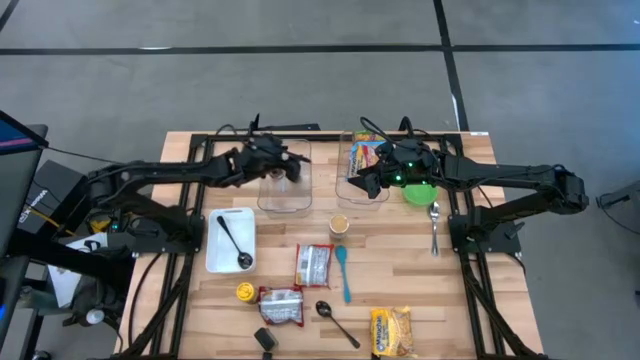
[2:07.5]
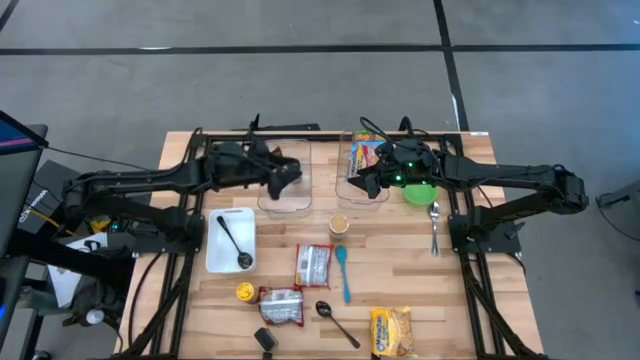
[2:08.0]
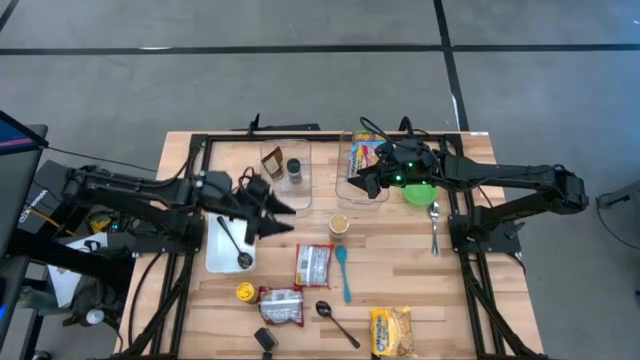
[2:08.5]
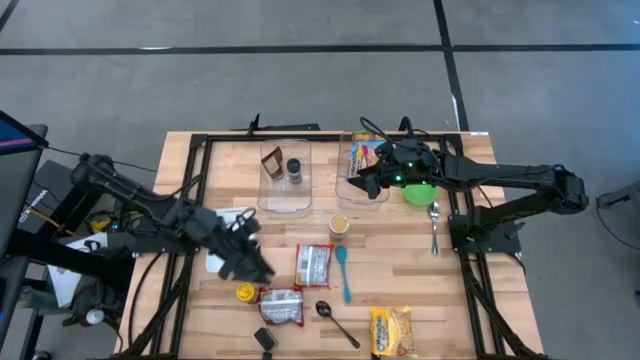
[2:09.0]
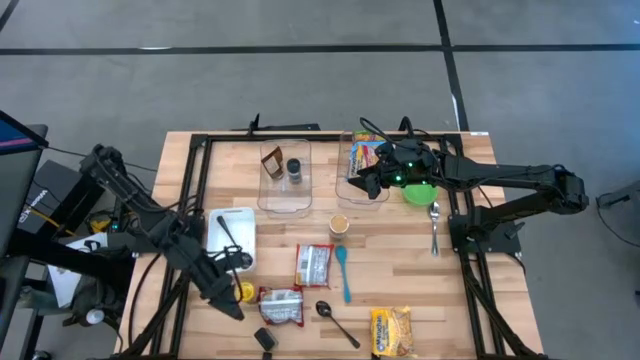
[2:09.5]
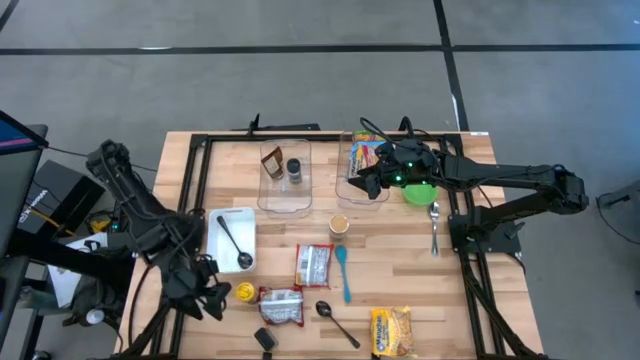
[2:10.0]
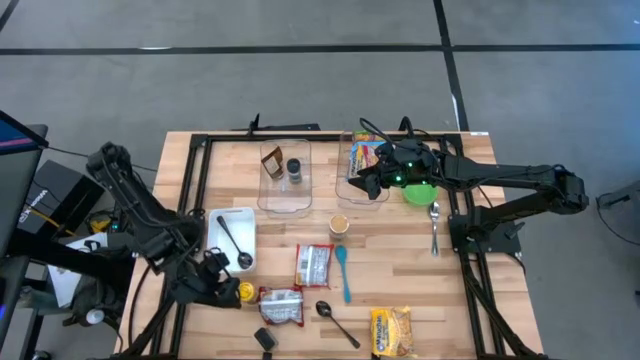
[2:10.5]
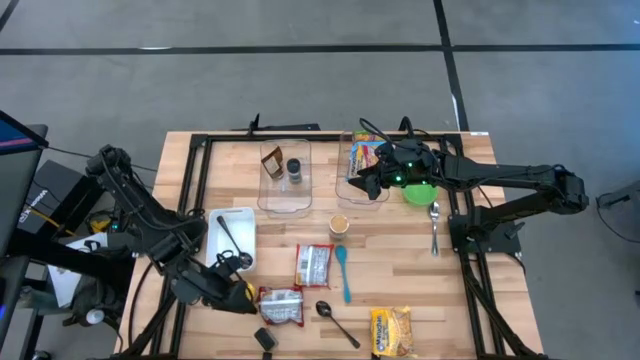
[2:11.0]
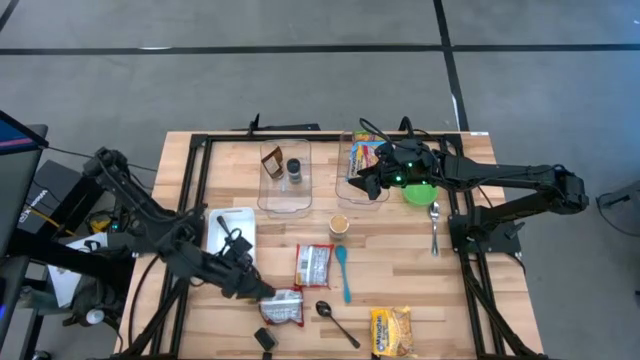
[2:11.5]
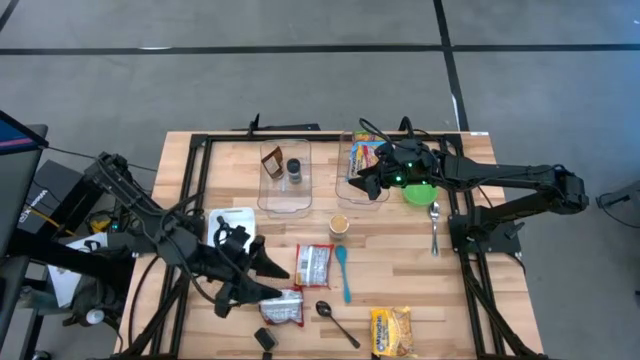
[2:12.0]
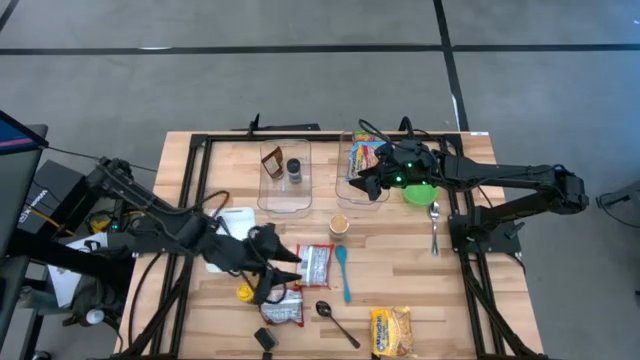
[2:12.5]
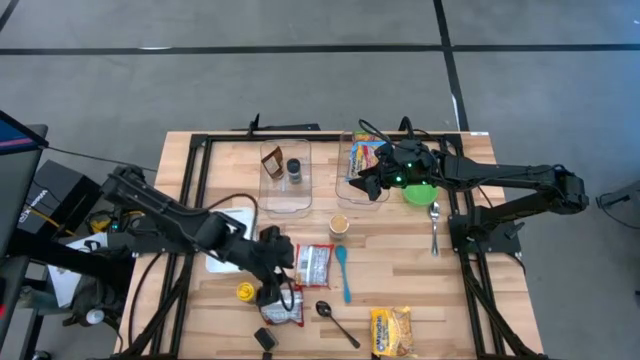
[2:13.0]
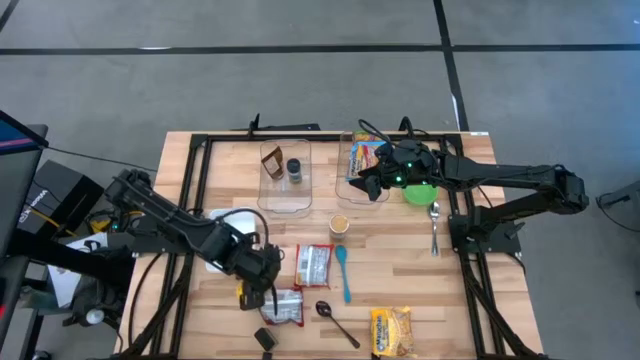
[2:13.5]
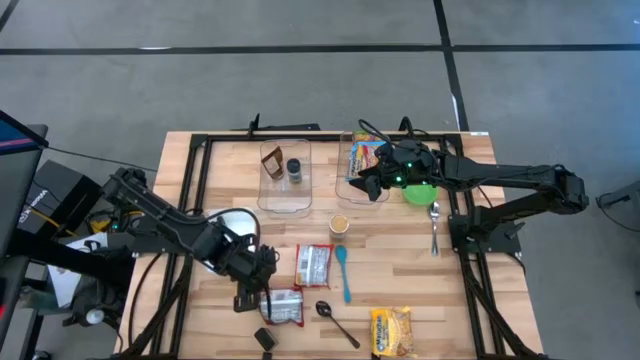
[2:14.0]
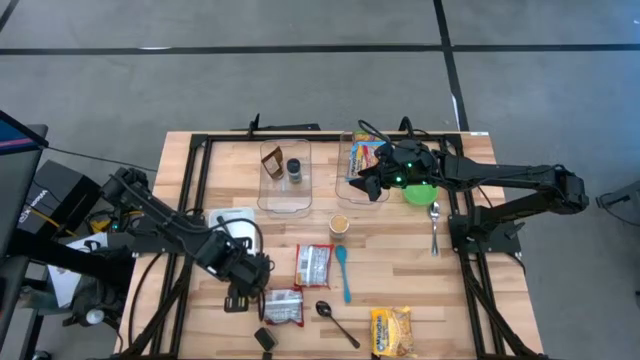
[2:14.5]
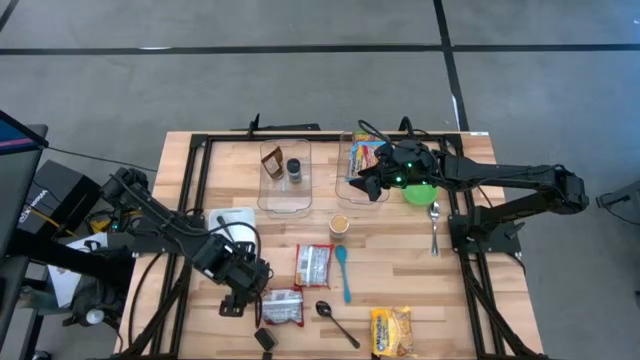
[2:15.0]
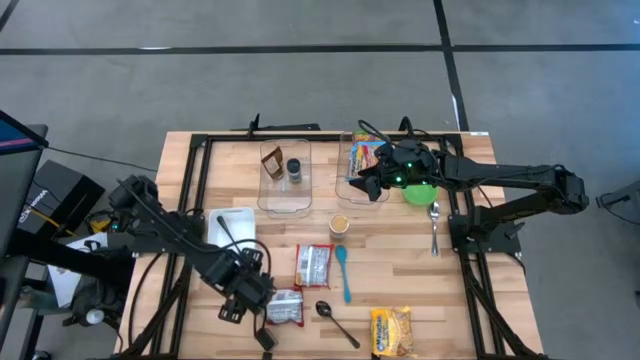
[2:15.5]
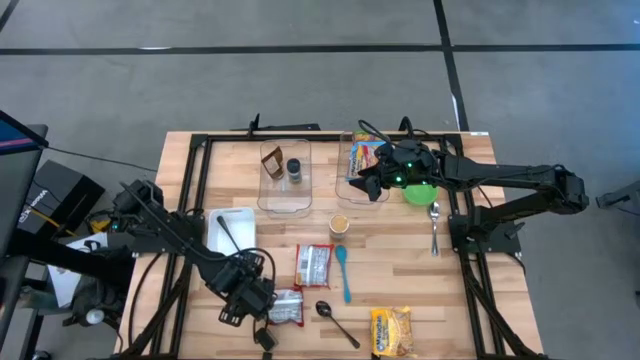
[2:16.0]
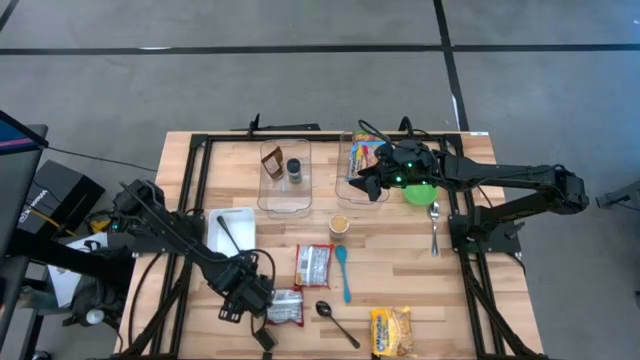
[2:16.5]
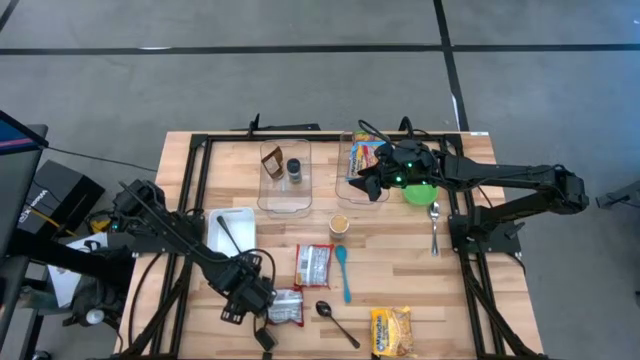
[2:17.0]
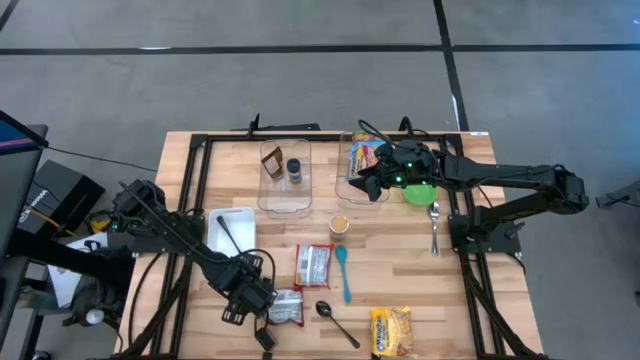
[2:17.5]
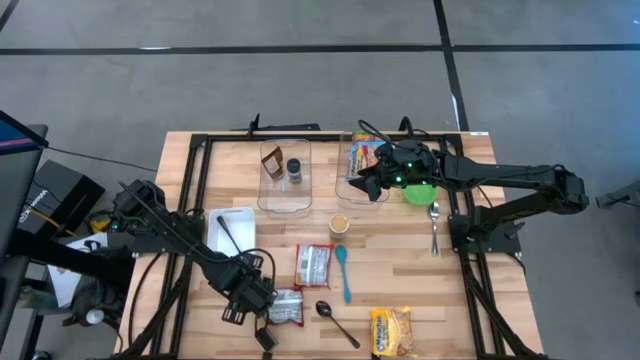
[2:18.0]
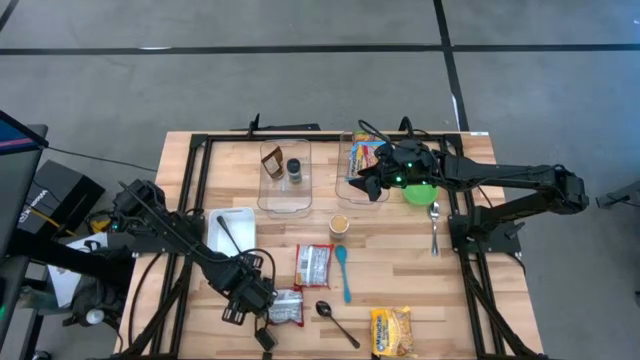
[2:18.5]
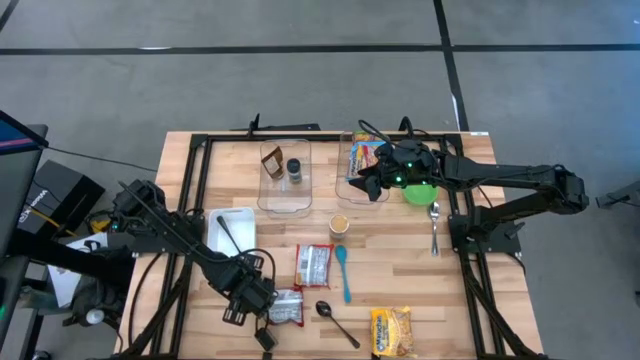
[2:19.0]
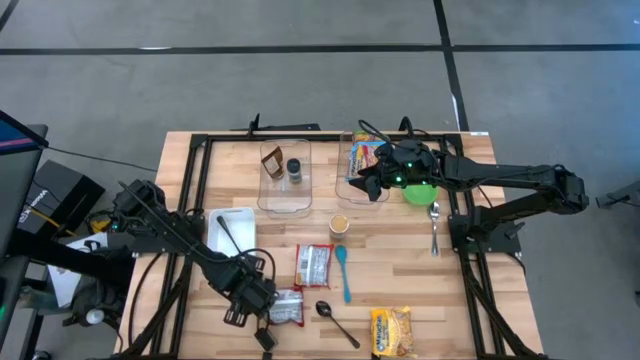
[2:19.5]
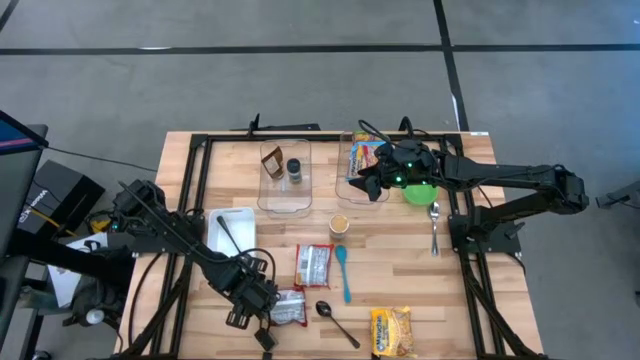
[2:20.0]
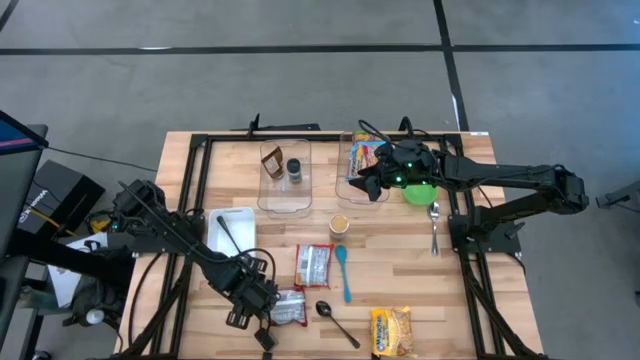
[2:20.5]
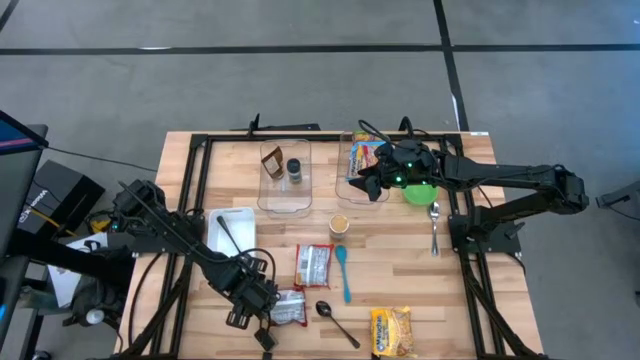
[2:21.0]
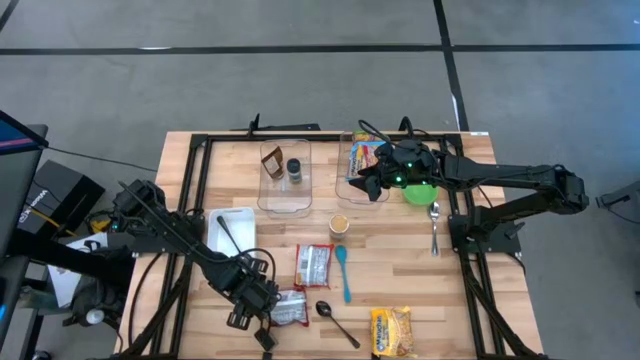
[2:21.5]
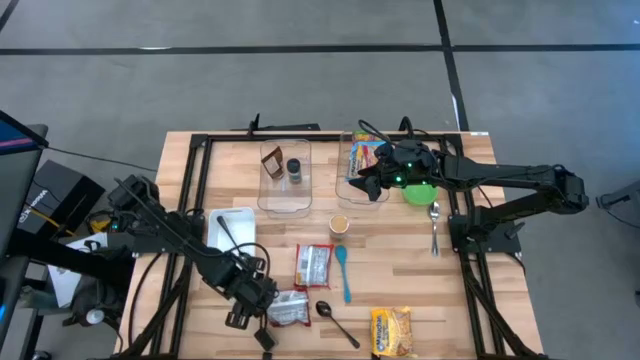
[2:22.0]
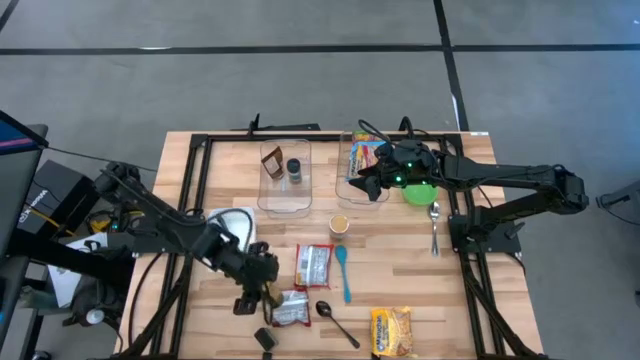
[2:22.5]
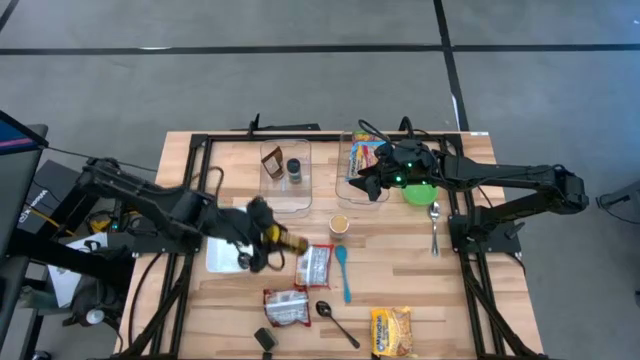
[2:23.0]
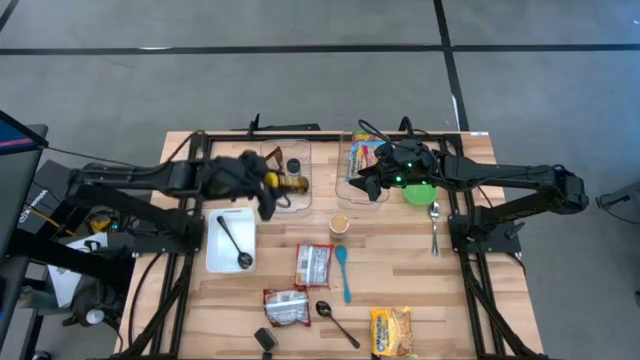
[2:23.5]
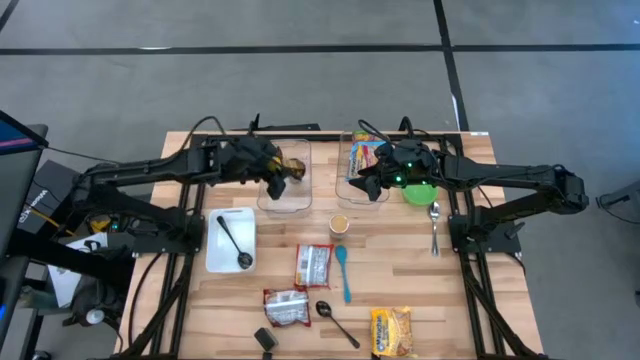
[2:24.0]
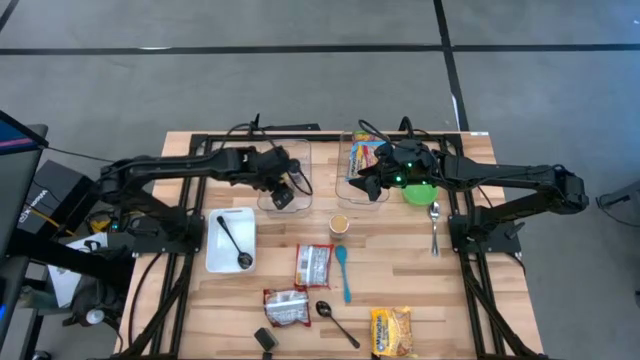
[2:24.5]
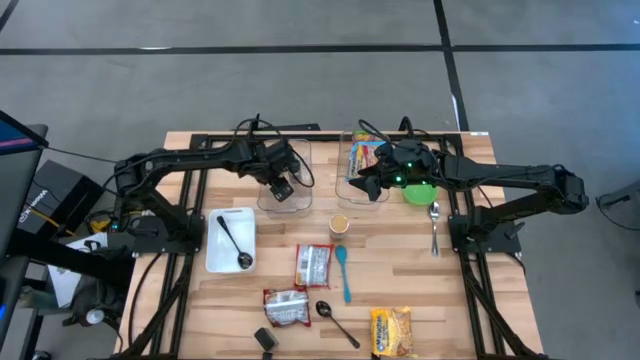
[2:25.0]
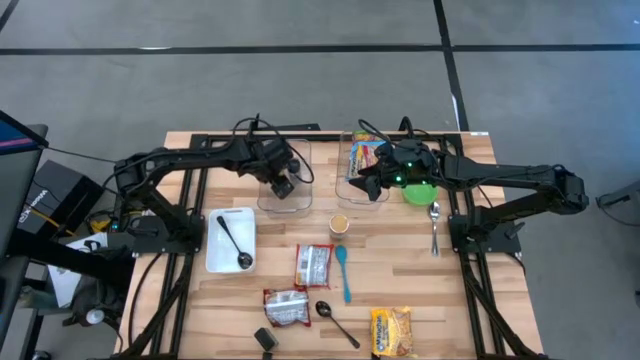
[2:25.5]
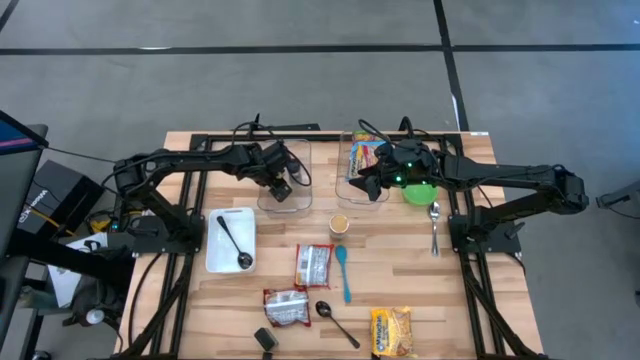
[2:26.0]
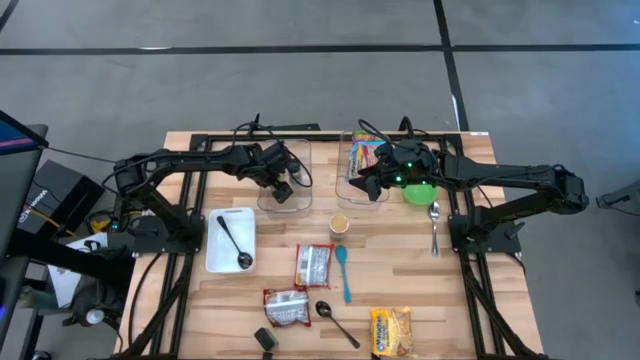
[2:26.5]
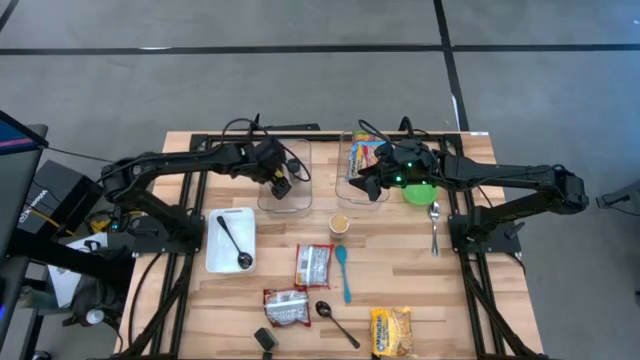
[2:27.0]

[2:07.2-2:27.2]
Task: Pick & Place Food Item
Put the yellow seasoning bottle into the left transparent bin

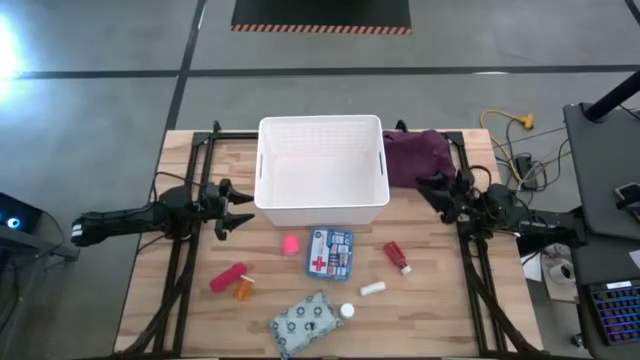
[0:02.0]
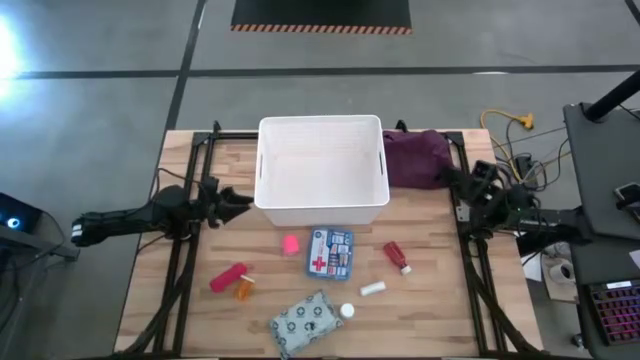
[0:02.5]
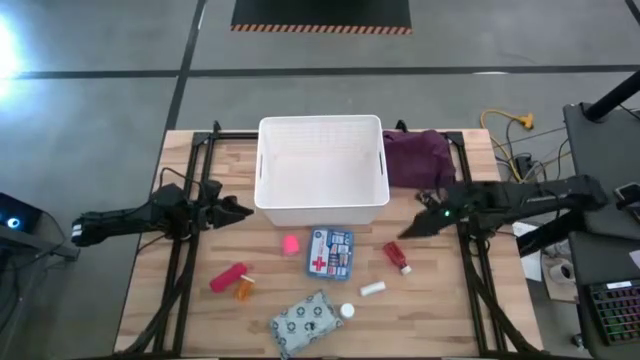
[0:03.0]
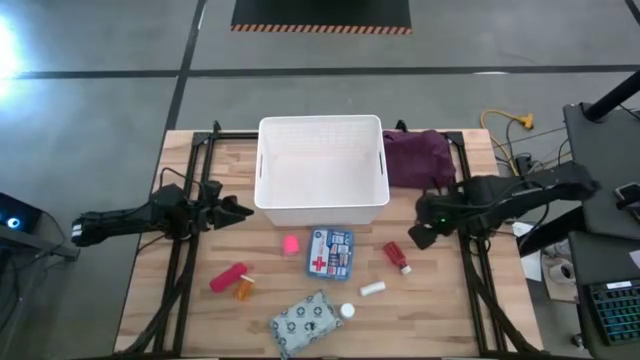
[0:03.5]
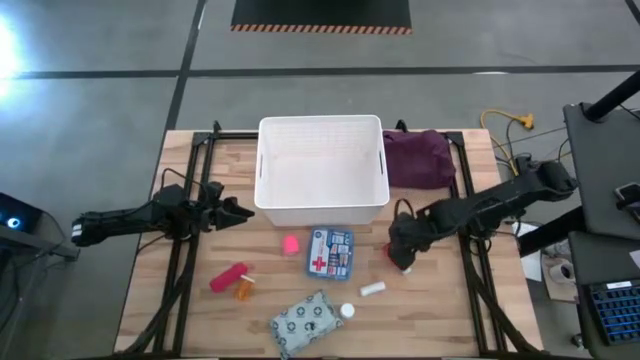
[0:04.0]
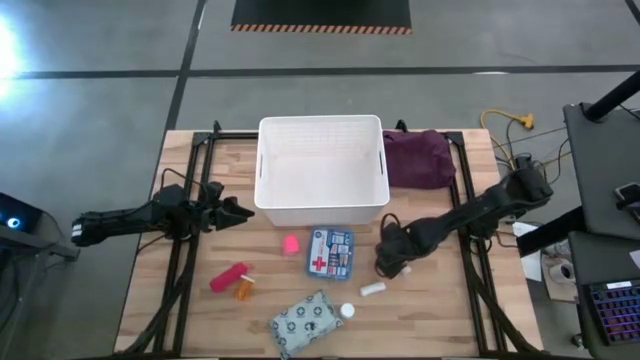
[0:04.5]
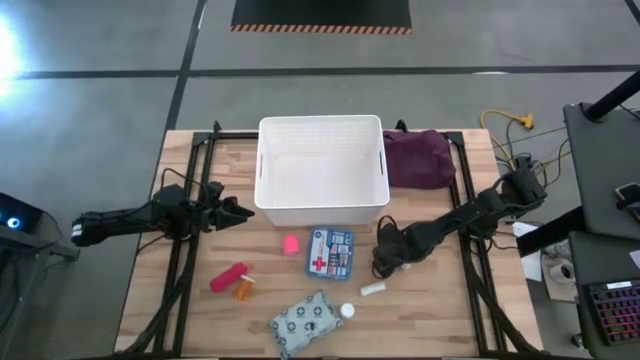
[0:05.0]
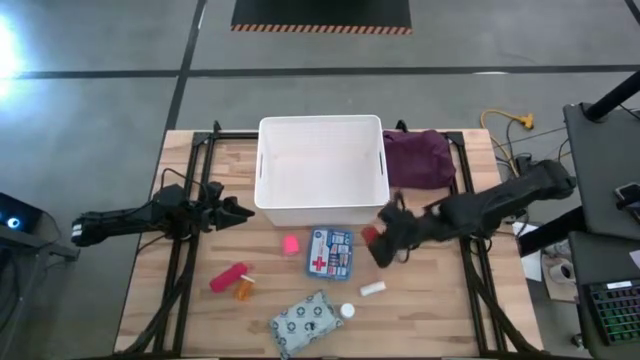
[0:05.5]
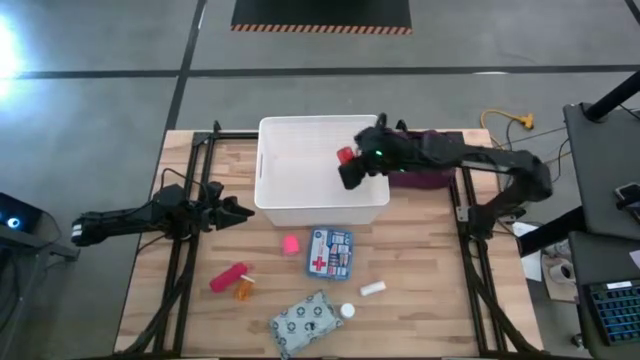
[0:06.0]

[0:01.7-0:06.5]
Task: Pick & place medical supplies in basket/bin
Put the red pill bottle into the white bin
